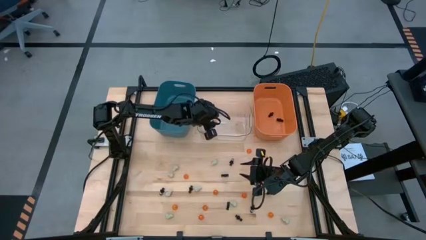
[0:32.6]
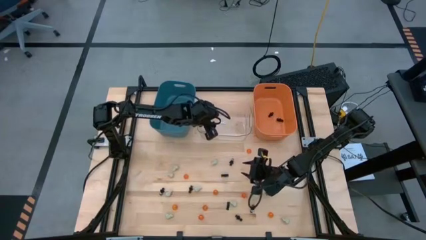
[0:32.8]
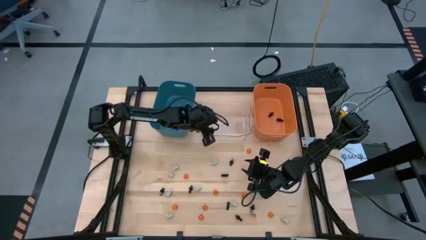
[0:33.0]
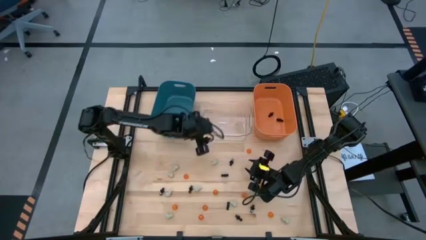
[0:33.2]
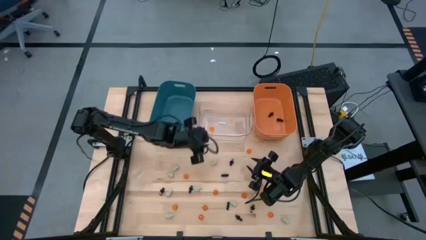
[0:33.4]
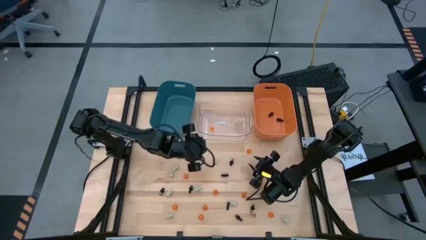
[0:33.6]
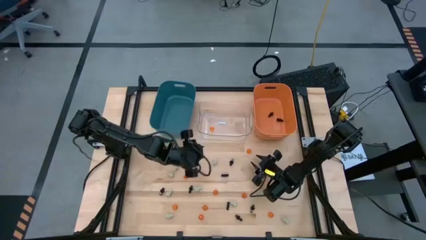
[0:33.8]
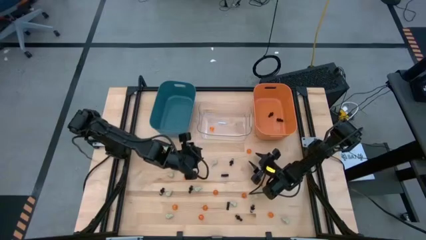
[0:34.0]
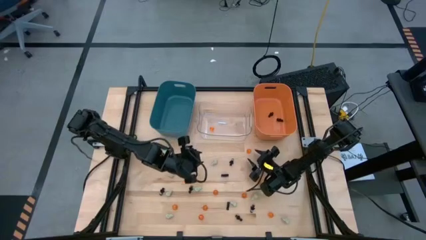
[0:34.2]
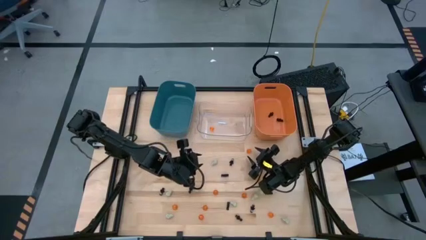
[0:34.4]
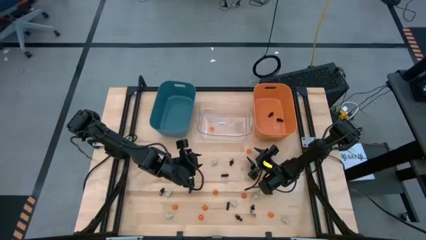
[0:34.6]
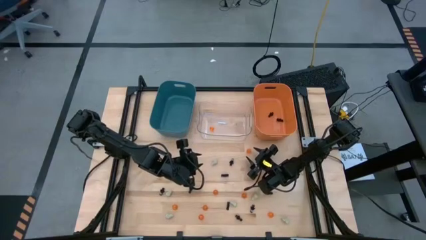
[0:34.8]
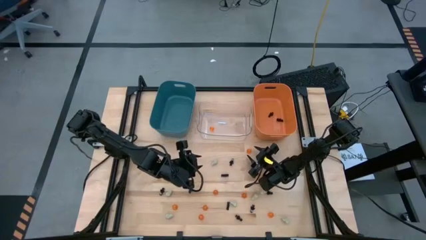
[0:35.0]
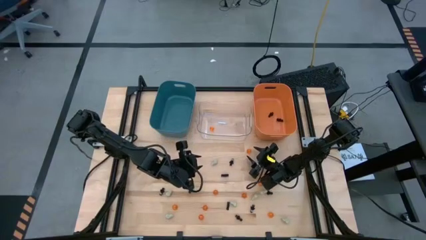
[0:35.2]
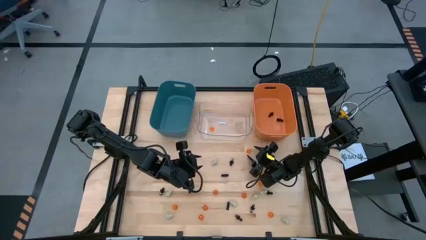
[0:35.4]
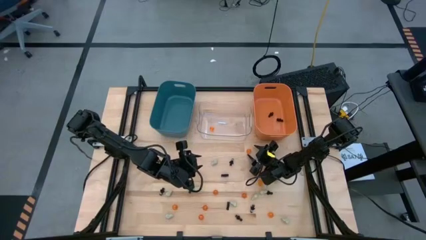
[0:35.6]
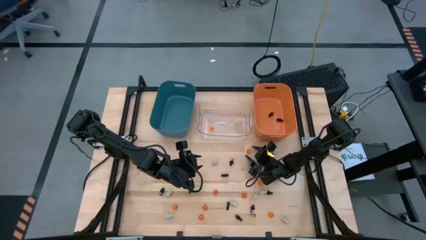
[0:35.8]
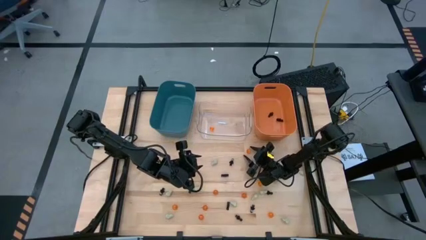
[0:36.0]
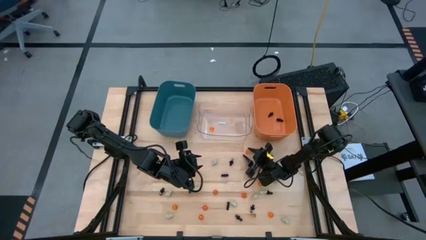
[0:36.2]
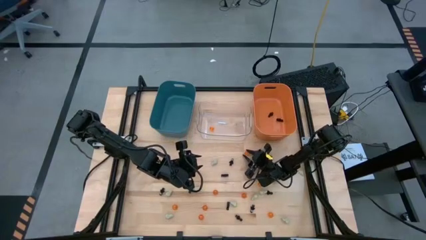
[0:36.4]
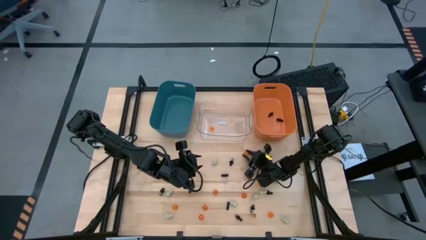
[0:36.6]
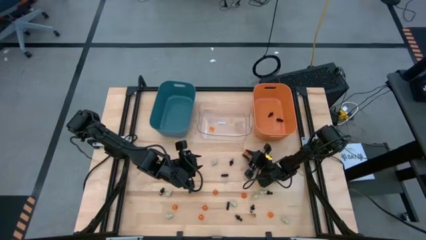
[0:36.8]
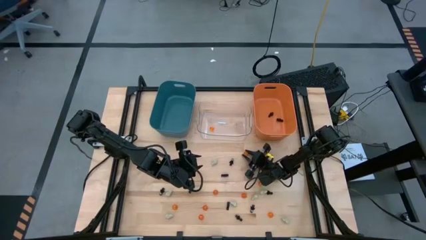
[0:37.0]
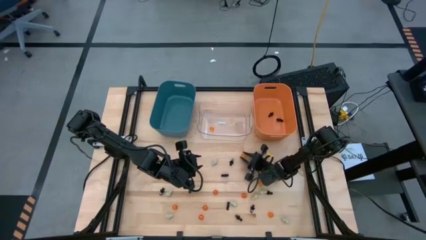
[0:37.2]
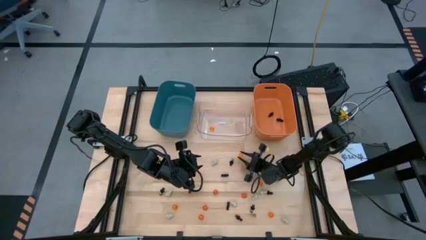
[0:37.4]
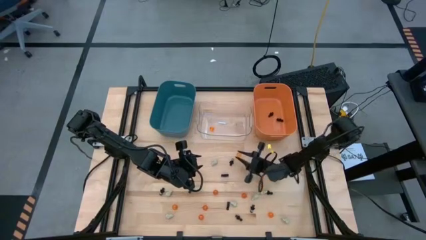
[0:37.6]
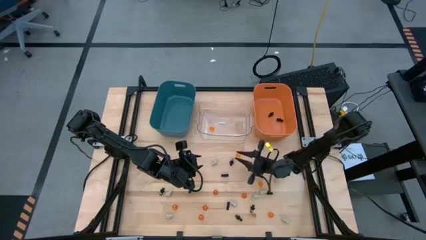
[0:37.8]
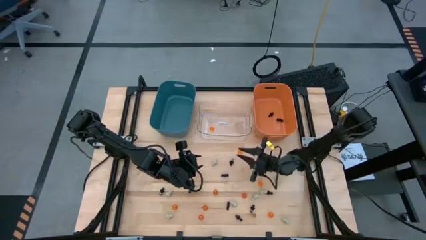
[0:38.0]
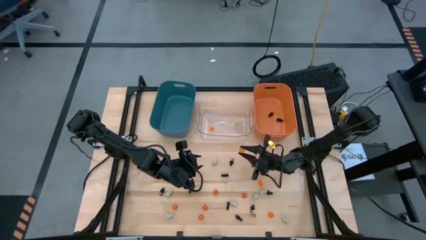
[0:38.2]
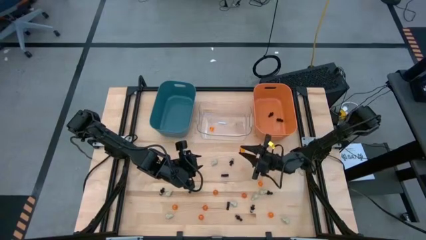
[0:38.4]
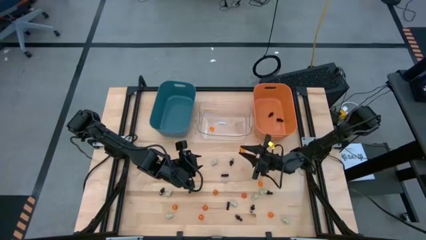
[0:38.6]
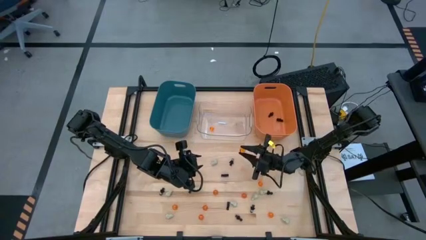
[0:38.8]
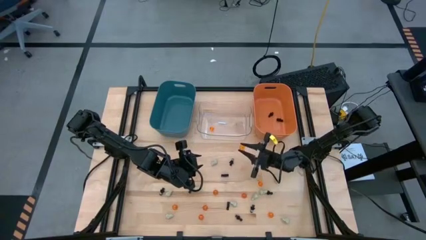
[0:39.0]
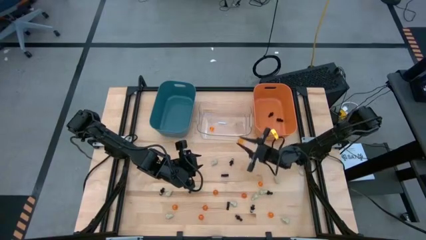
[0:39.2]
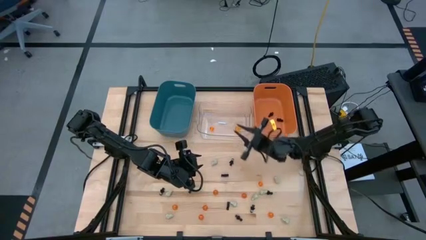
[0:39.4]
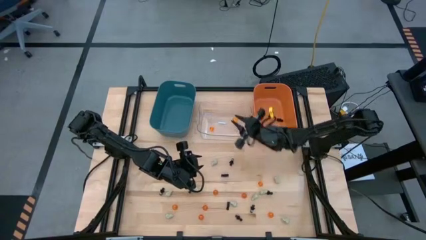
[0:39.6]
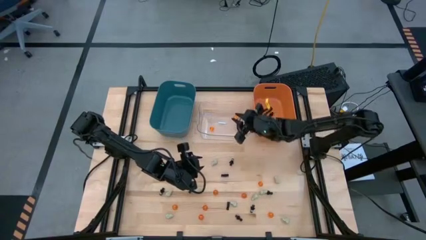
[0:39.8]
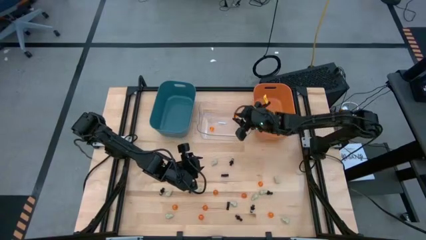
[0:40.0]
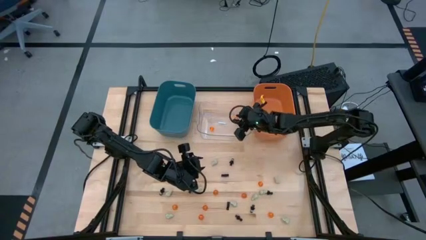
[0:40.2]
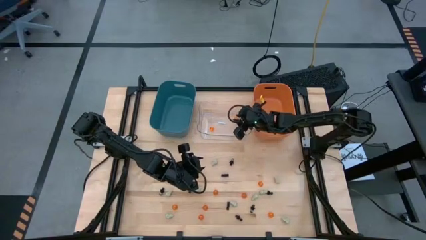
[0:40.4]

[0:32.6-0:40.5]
Task: Sort Halloween decoration
Put the orange pumpkin toy into the transparent bin

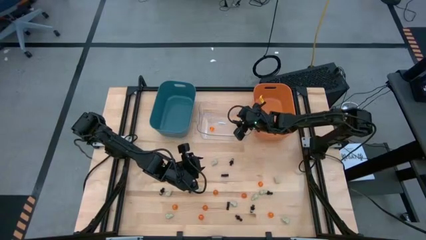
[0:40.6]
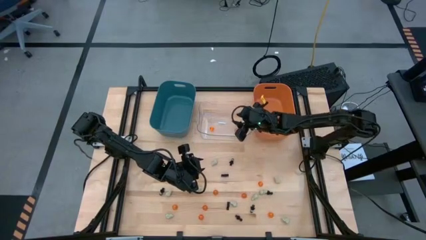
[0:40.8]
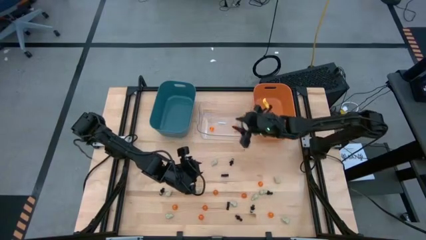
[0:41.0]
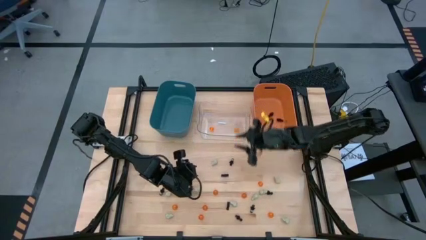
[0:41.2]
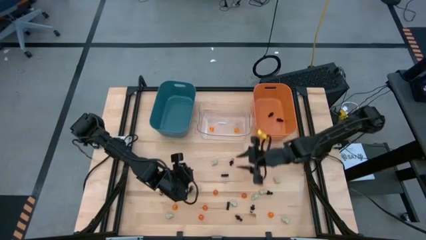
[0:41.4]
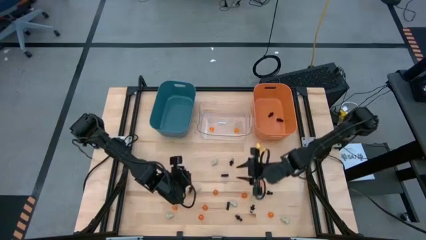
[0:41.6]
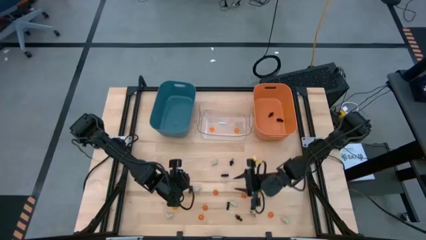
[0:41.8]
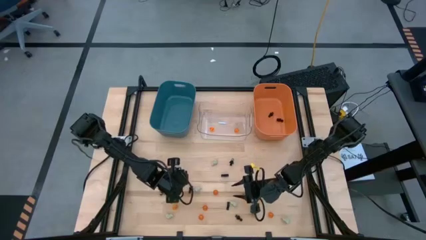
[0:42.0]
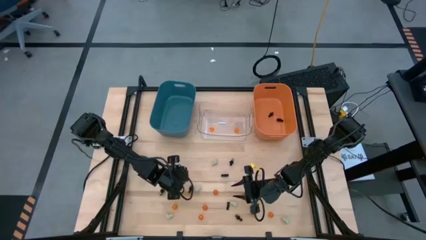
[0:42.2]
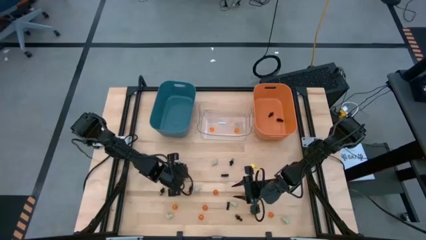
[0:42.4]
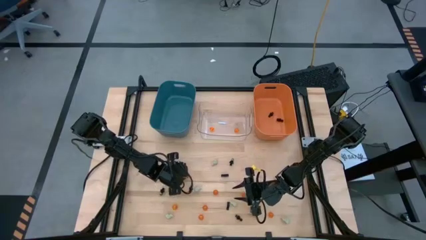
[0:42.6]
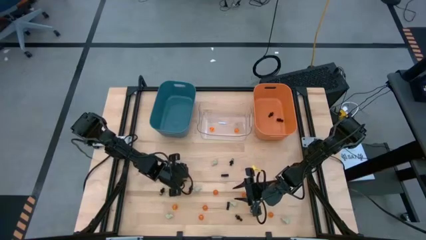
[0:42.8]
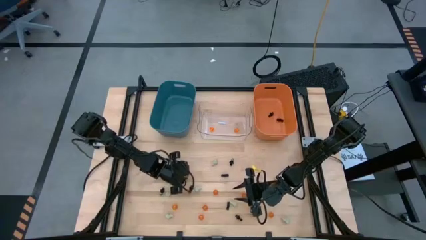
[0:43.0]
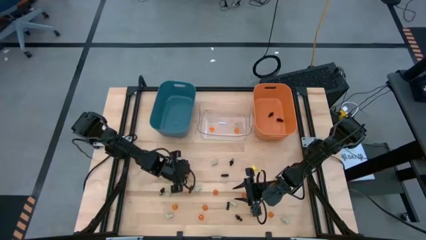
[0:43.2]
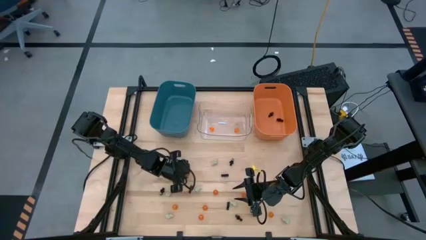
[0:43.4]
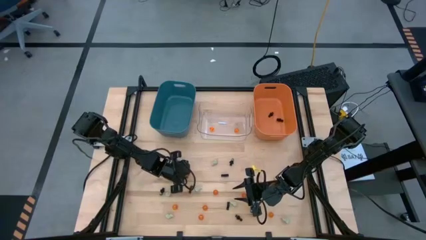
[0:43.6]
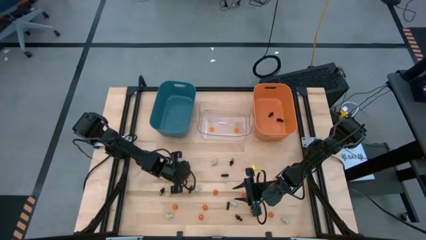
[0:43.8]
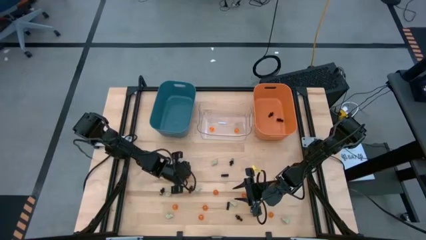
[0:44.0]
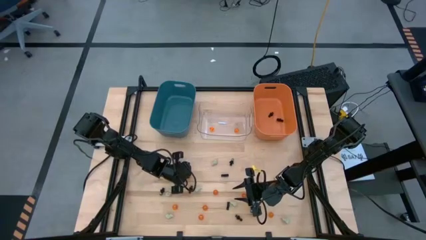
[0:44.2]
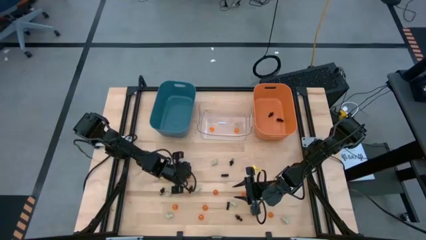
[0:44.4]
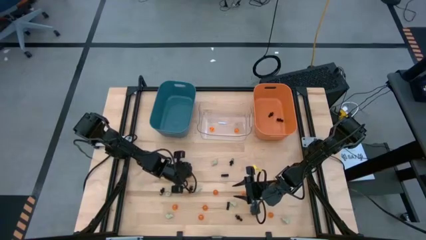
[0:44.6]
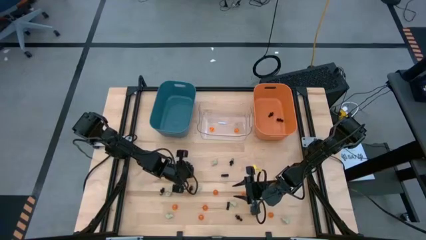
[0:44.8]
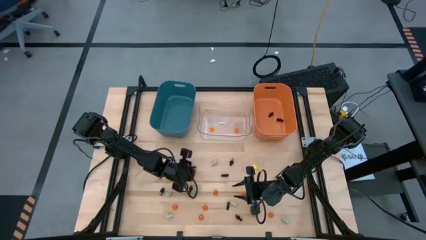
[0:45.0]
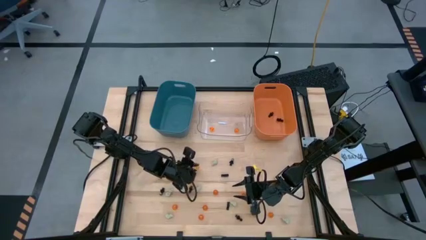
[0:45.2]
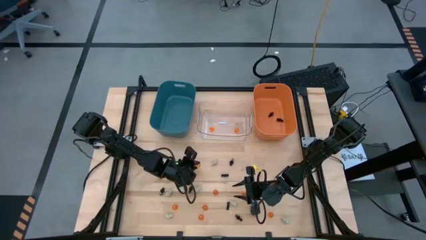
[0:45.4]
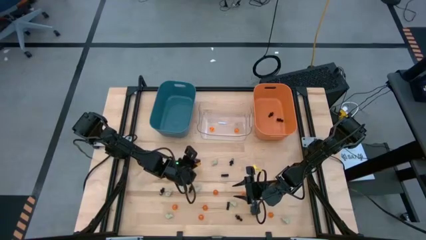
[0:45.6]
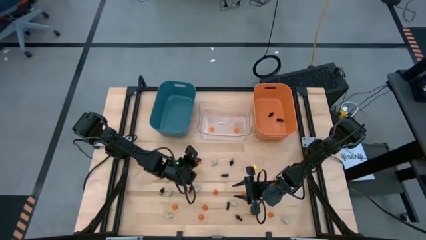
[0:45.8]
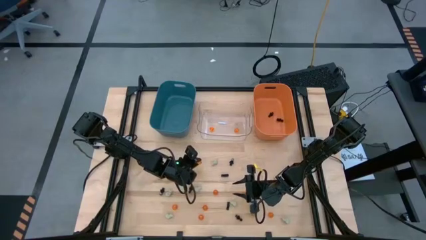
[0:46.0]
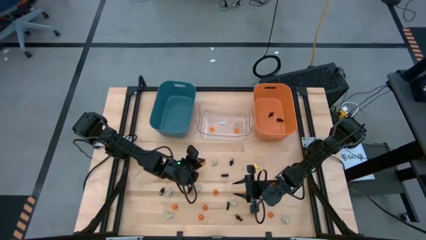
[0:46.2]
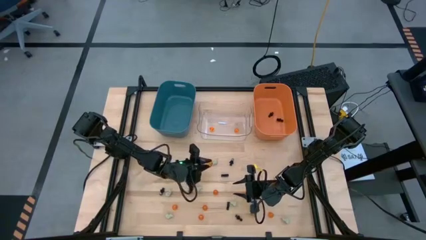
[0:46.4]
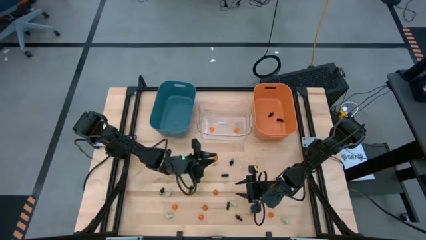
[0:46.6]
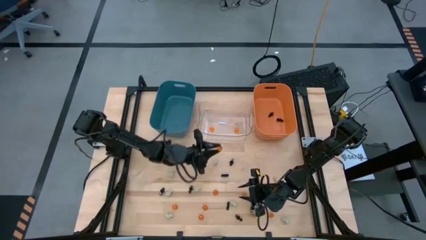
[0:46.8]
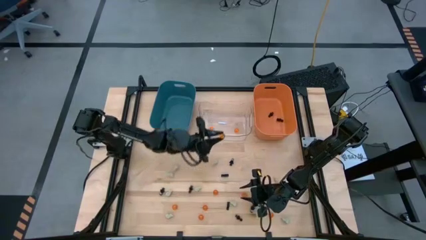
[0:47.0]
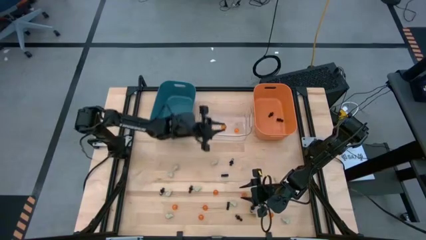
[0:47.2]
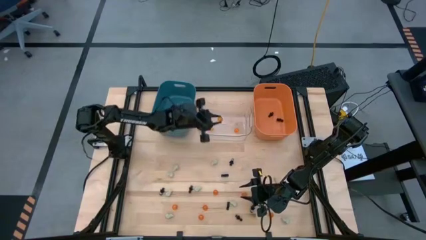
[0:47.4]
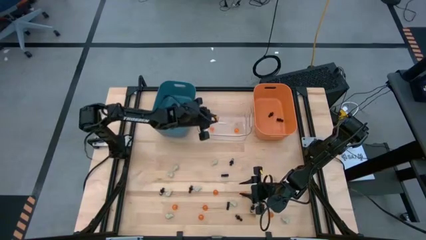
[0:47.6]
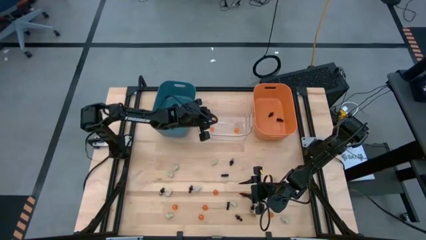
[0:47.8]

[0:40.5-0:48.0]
Put the orange pumpkin toy into the transparent bin

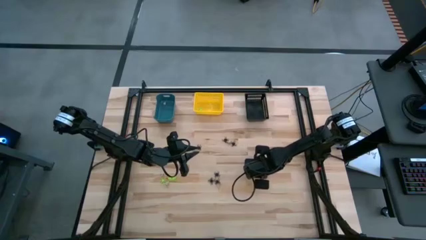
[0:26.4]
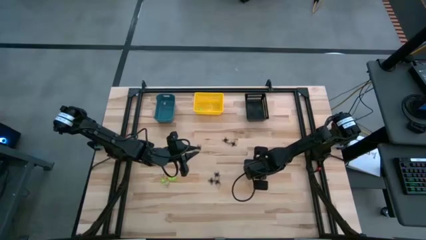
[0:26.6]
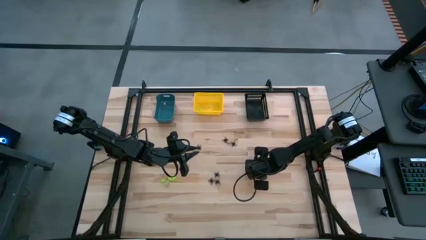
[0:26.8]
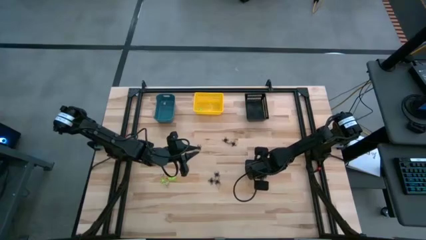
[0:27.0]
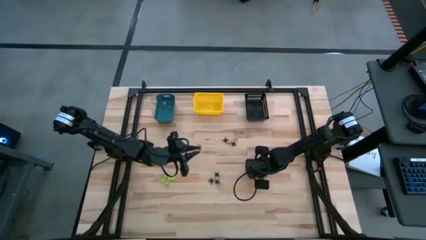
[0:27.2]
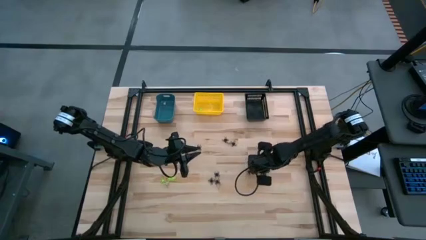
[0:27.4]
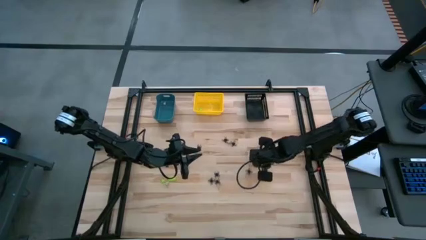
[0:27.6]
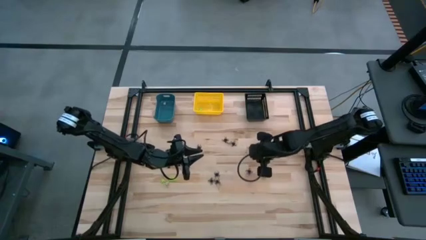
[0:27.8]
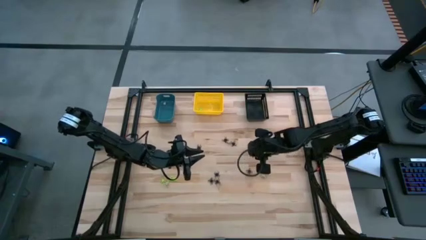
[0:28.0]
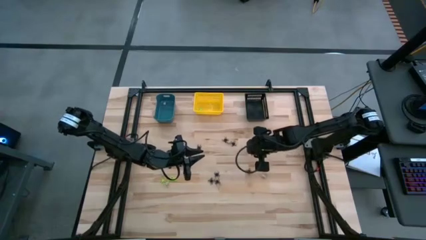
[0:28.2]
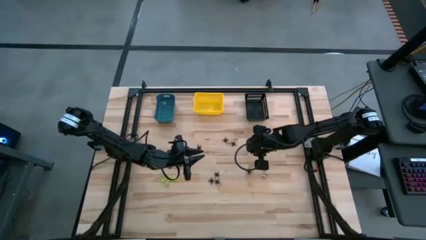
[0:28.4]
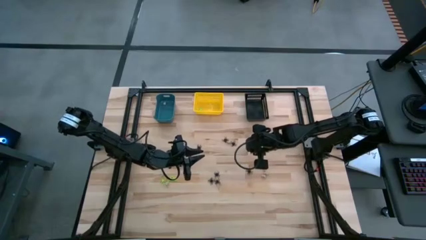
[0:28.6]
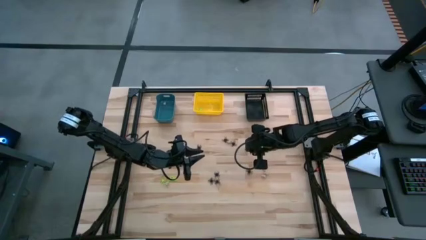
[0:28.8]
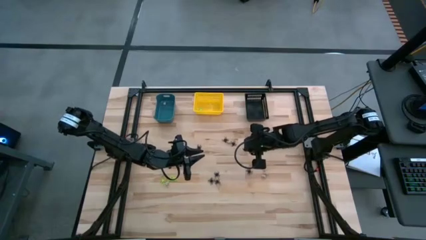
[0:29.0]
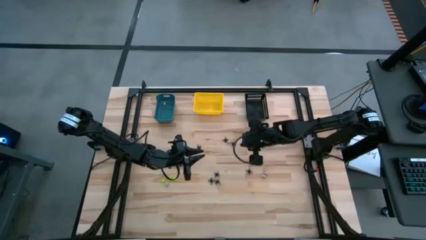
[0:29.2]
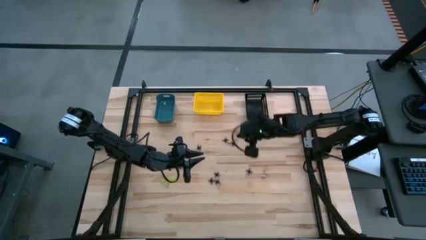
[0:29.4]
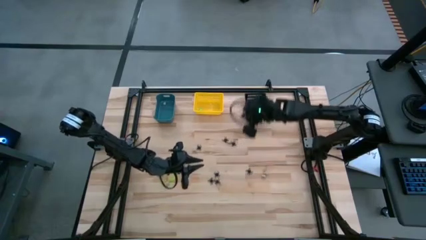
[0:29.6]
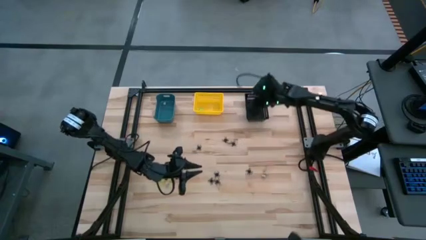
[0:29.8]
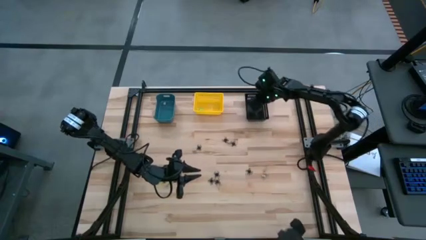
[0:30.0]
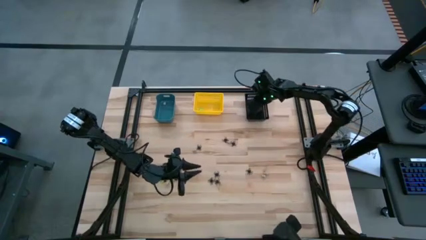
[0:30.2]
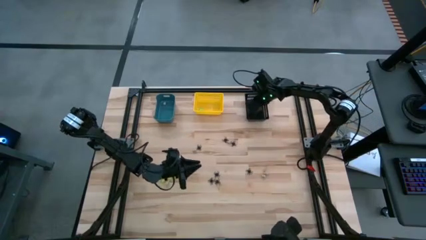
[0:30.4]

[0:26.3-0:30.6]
Task: Sort Halloween decoration
Put the black spider toy into the black bin
